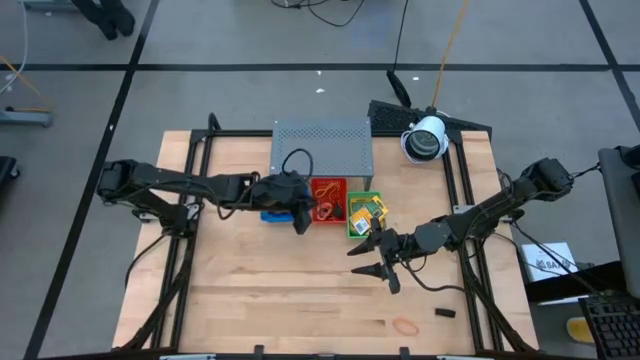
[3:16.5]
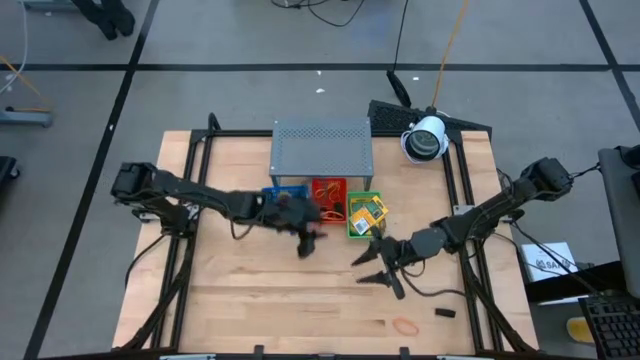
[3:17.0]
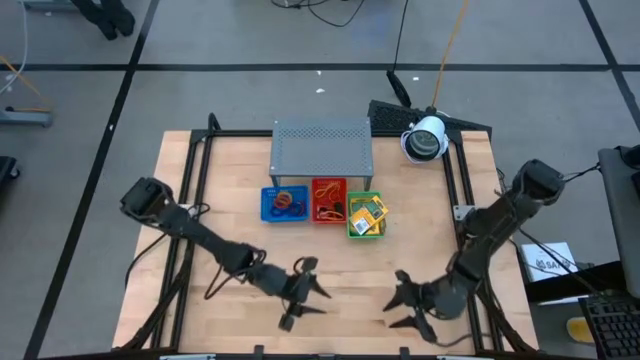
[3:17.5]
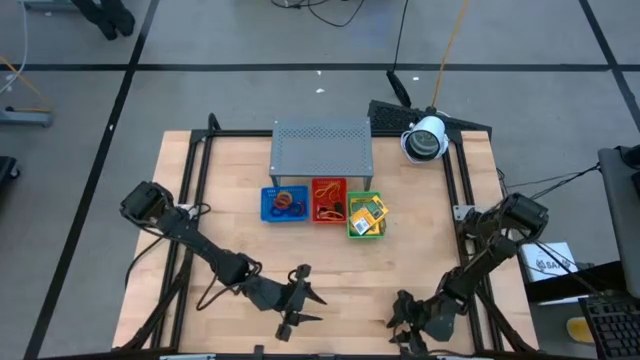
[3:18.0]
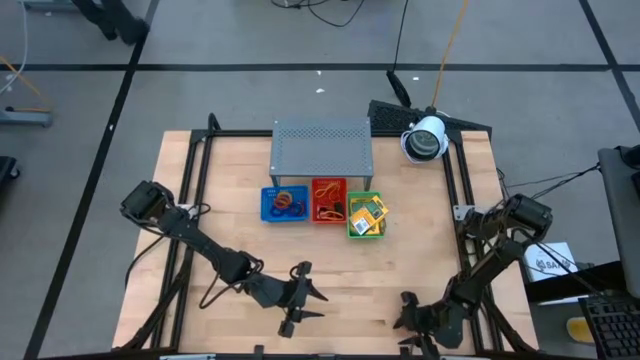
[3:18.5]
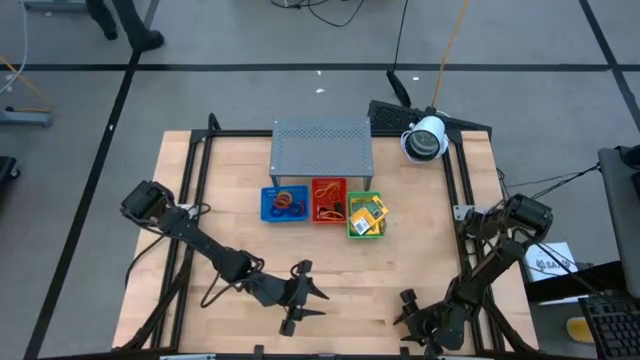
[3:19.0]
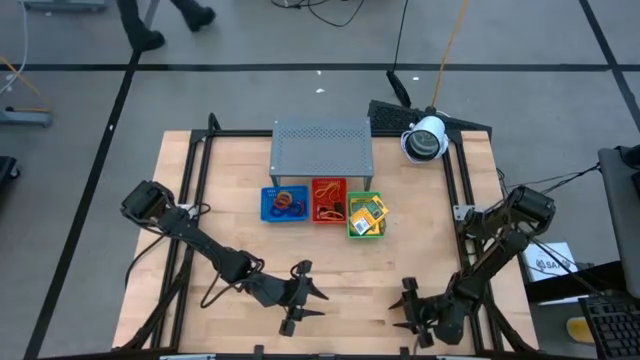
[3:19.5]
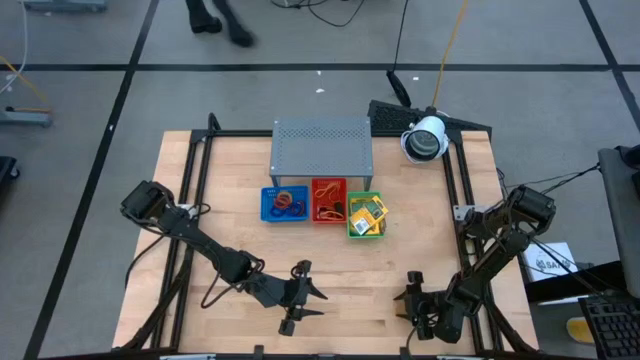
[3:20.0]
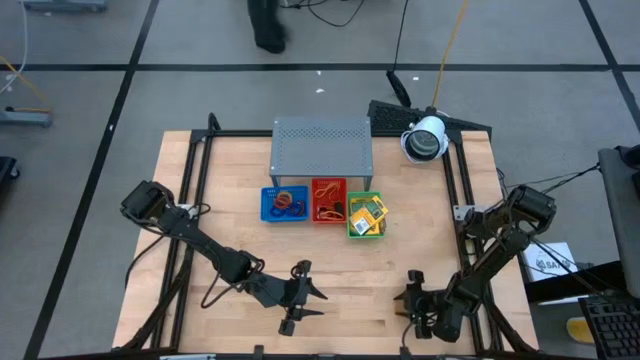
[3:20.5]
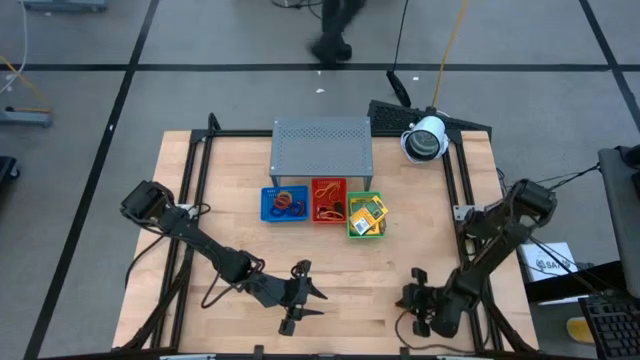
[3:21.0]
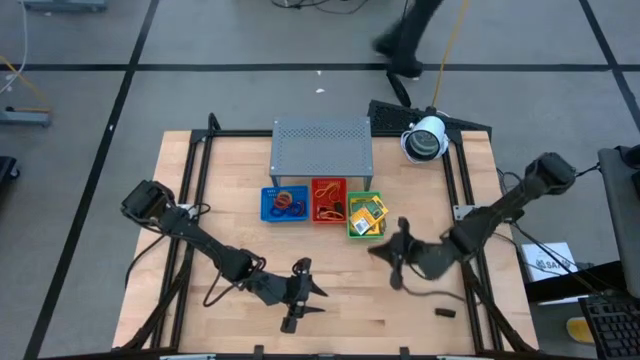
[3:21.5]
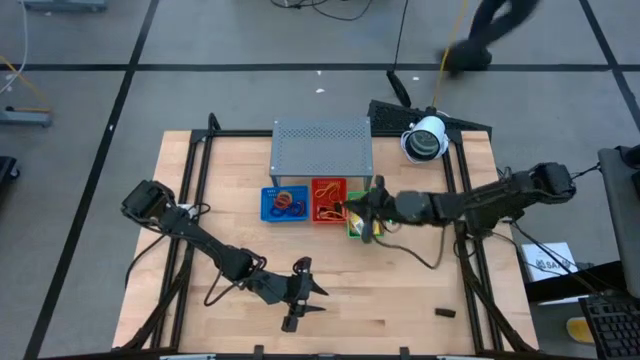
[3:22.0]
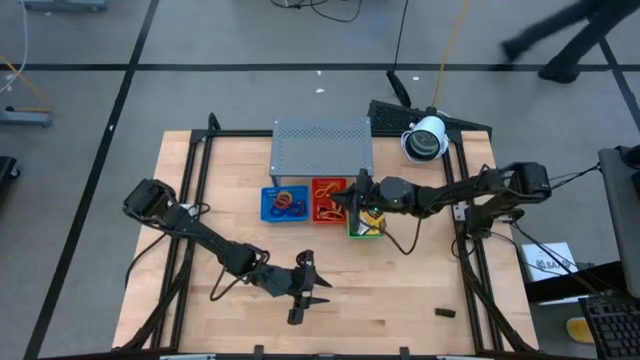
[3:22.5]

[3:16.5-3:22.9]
Task: Pick & Place Office Desk Supplies
Put the orange rubber band into the red bin

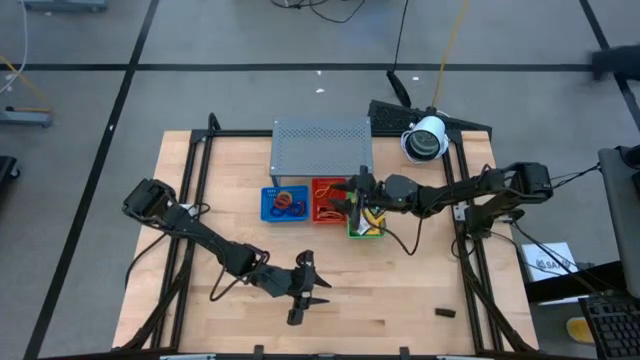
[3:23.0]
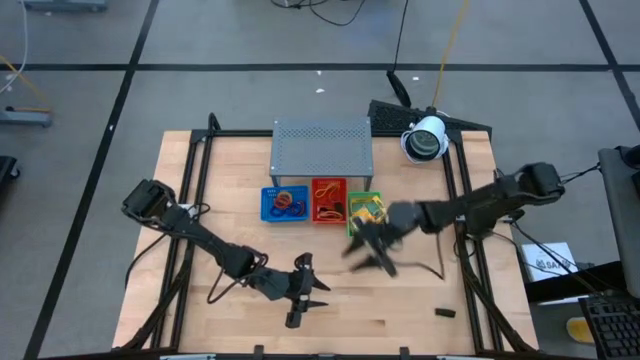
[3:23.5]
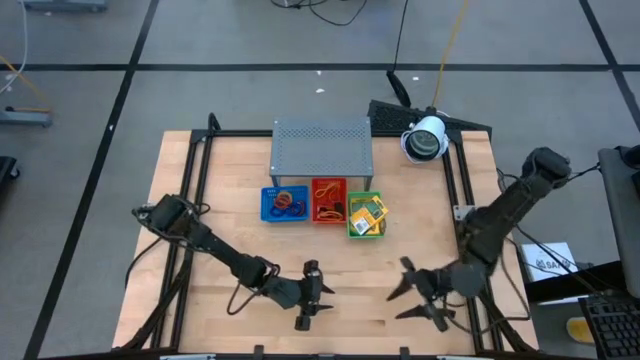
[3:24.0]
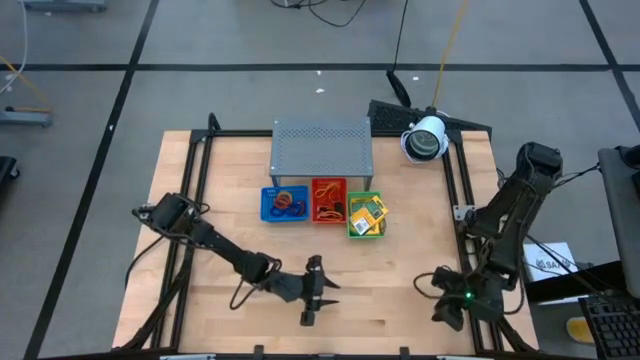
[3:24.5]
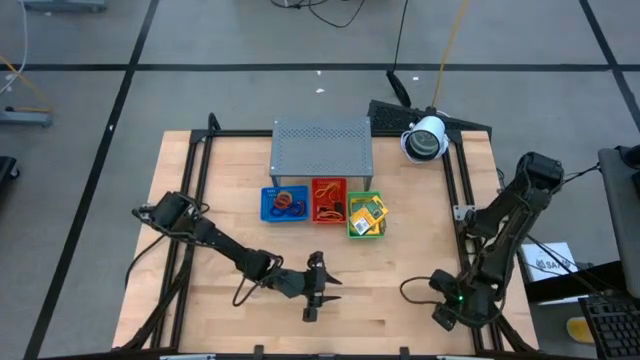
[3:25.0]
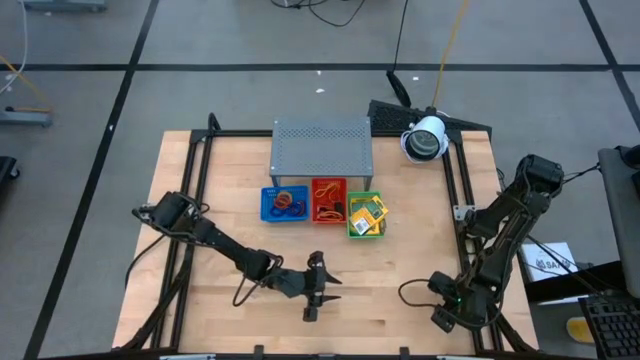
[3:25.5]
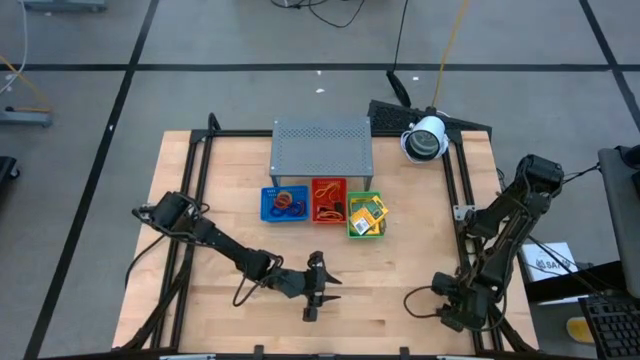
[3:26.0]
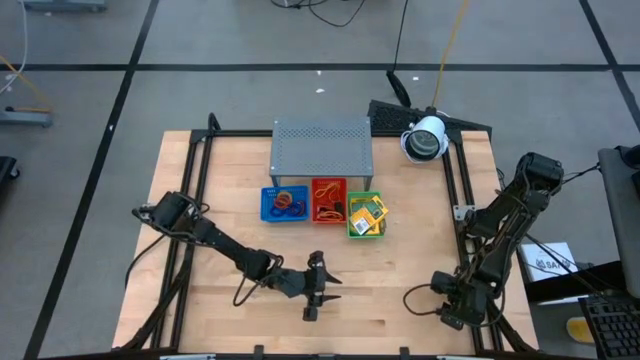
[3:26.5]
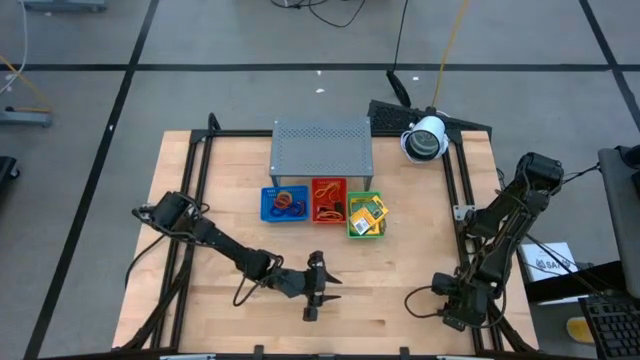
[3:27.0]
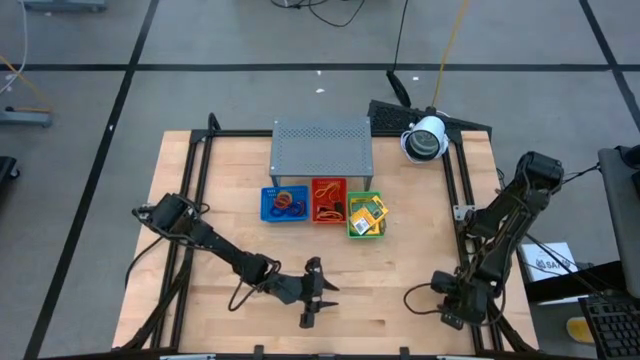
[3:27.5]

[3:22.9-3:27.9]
Put the black rubber band into the red bin

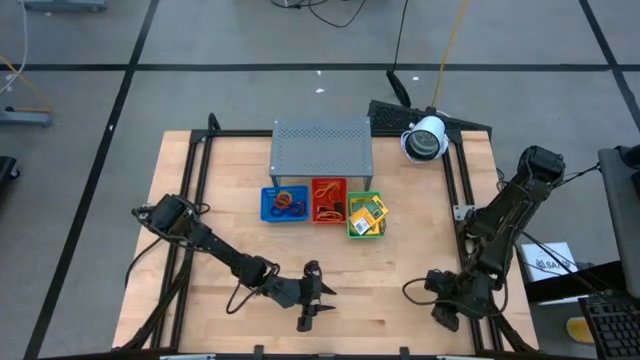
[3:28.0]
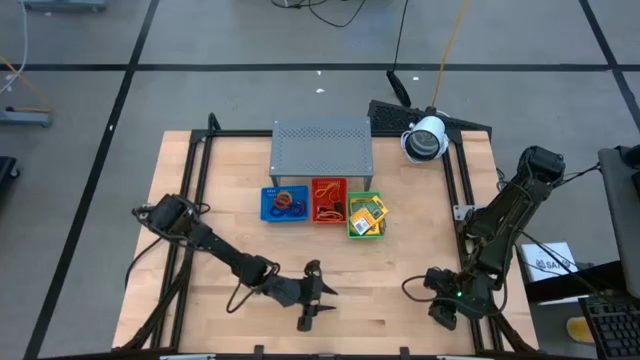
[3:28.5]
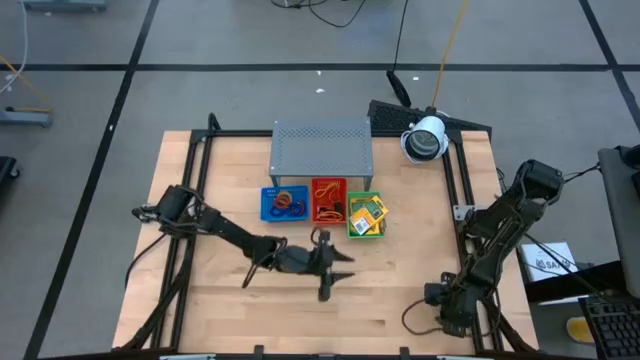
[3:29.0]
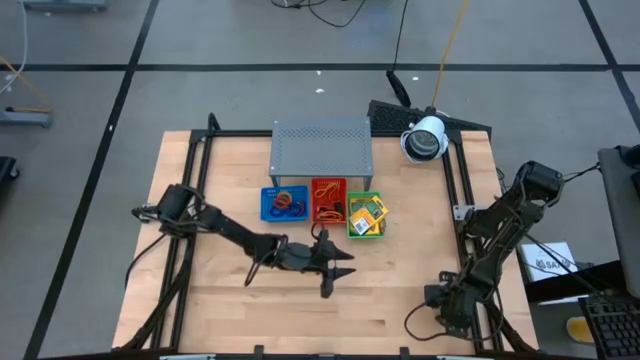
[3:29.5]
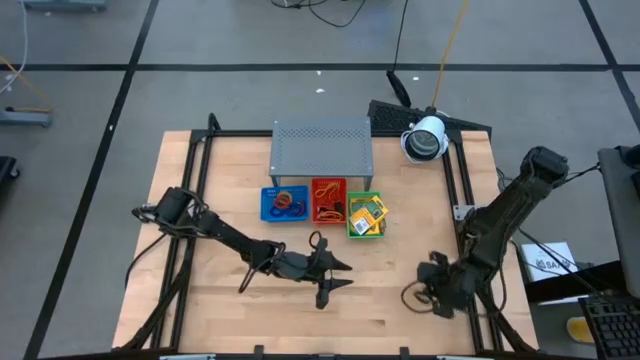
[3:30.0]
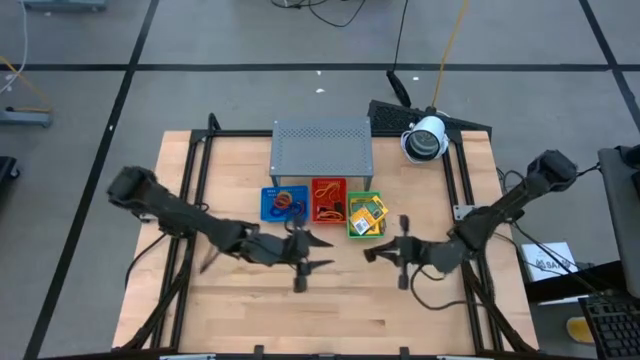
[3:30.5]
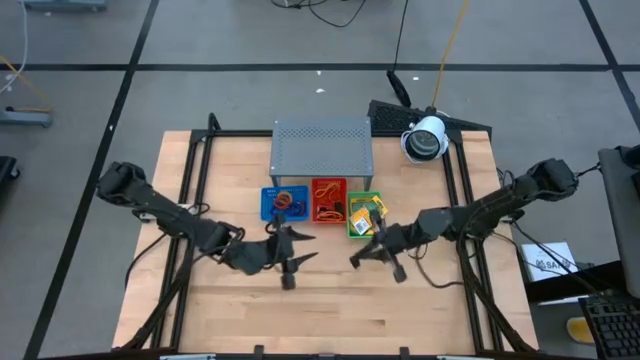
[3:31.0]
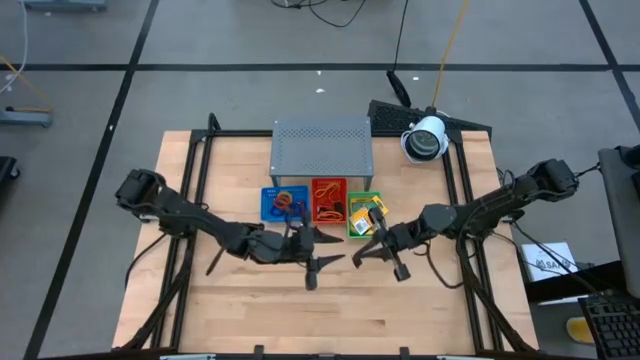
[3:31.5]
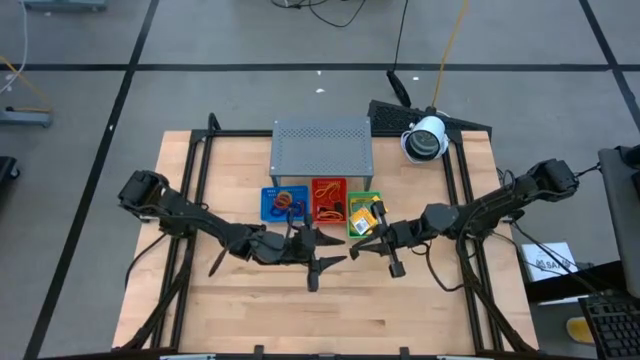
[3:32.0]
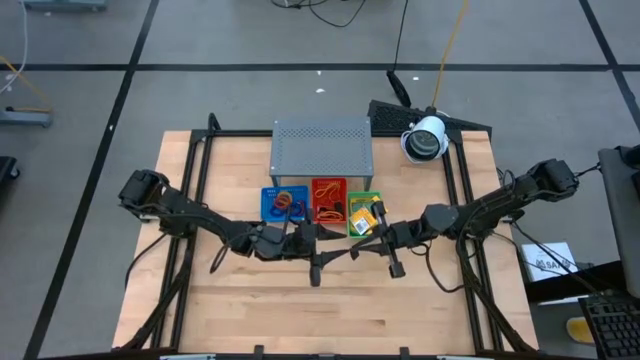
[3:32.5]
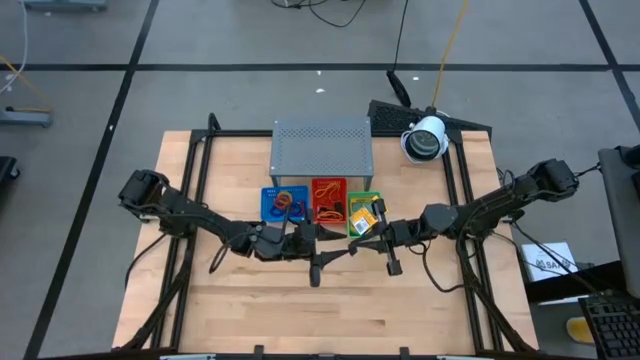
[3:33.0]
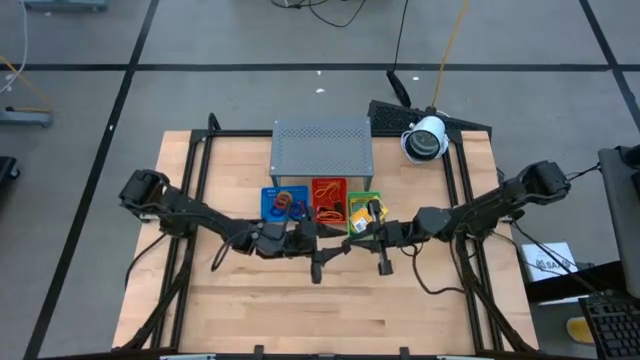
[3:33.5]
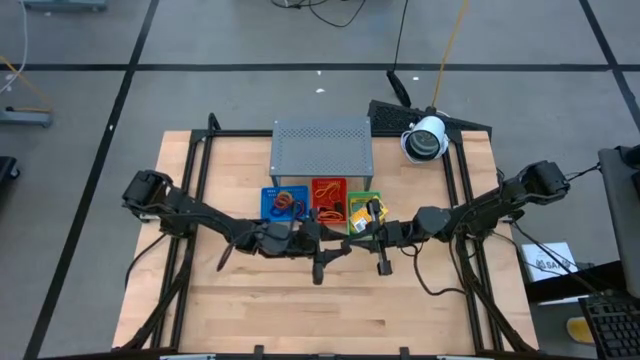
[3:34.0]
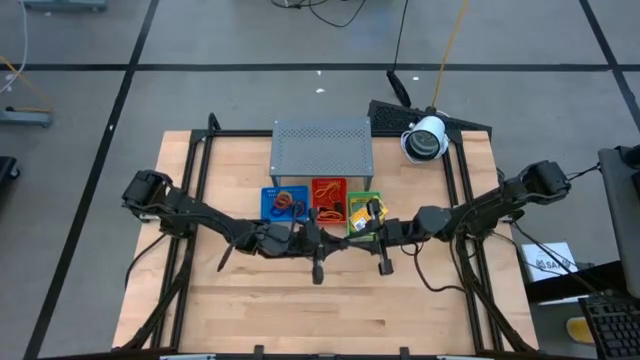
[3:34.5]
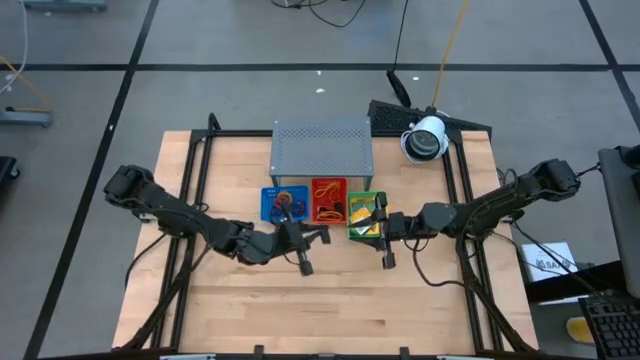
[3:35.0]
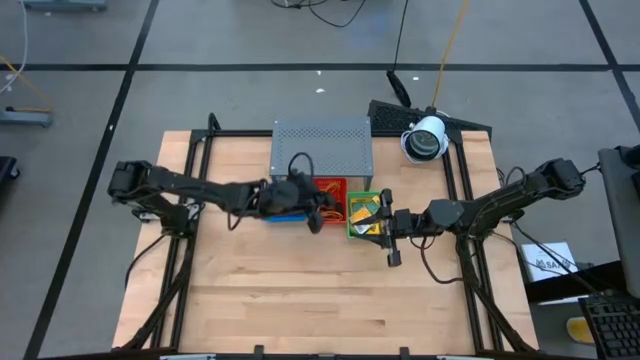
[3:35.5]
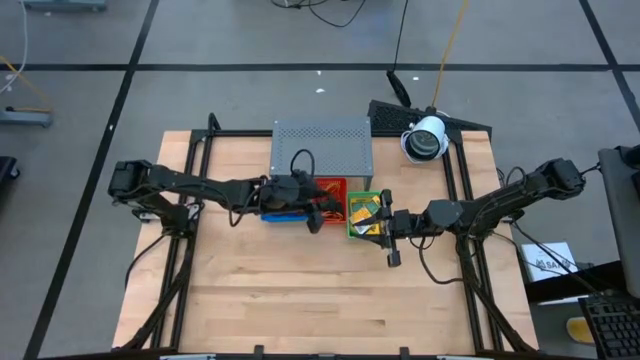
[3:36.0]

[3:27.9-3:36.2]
Put the black rubber band into the red bin

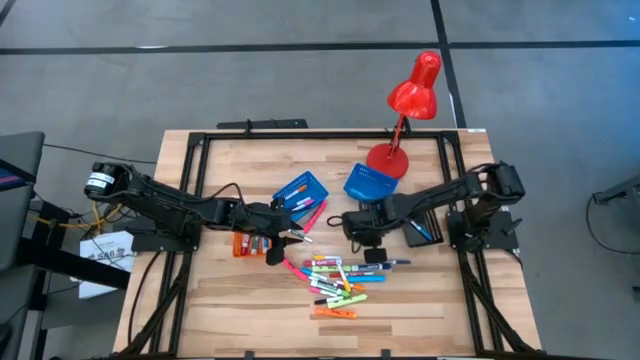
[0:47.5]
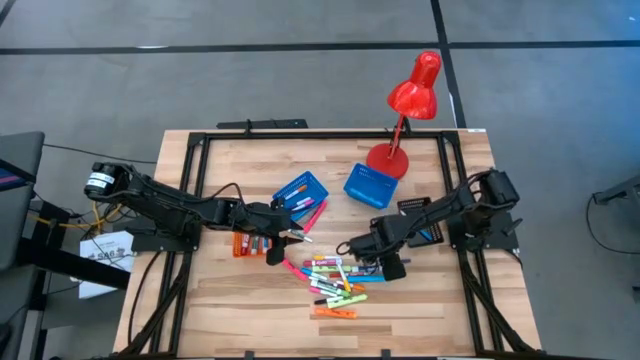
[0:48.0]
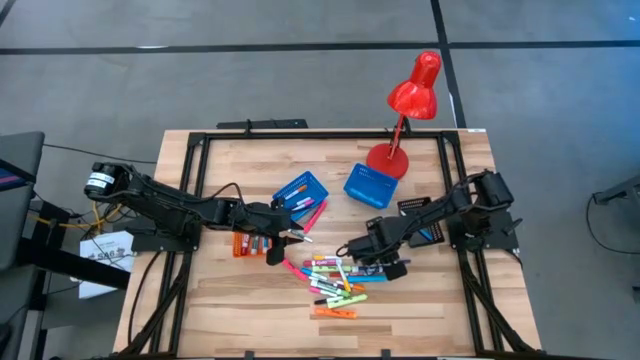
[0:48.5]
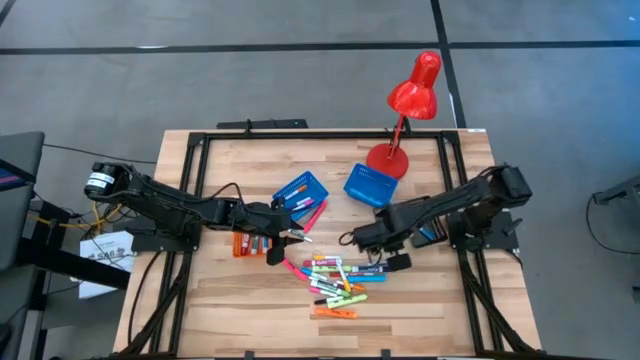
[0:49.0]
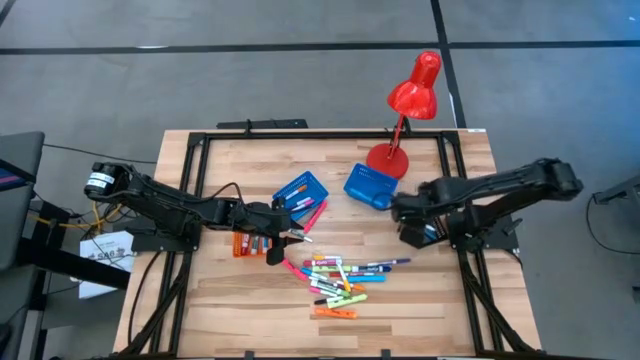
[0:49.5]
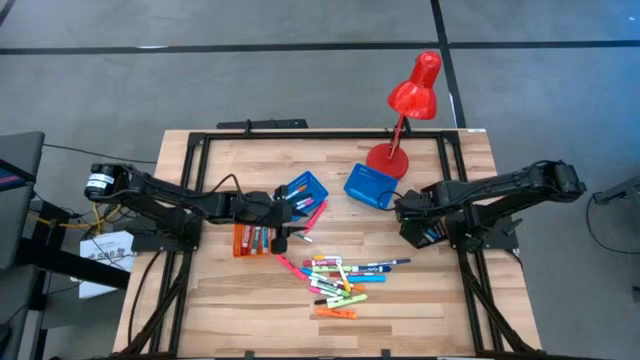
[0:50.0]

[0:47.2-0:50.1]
Task: Pick & Place Markers
Put the small light green marker pen into the black bin
